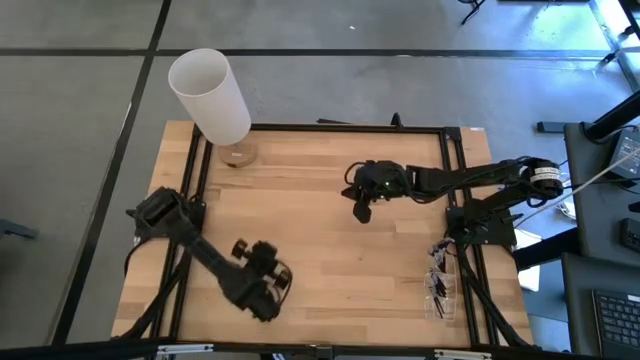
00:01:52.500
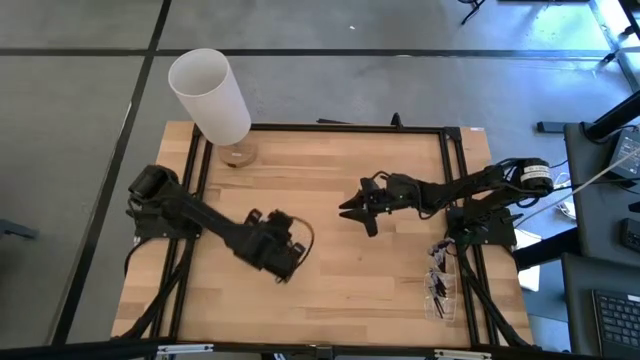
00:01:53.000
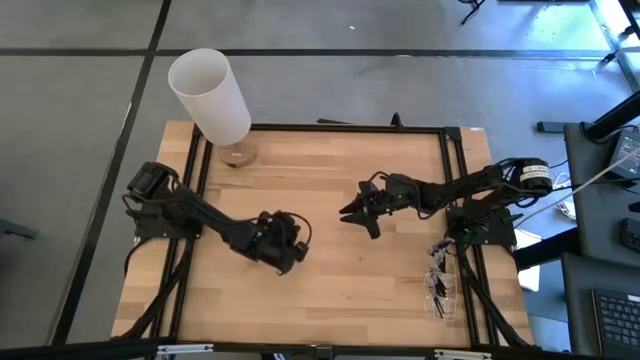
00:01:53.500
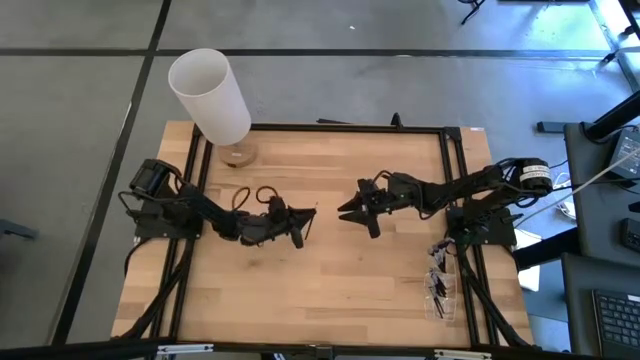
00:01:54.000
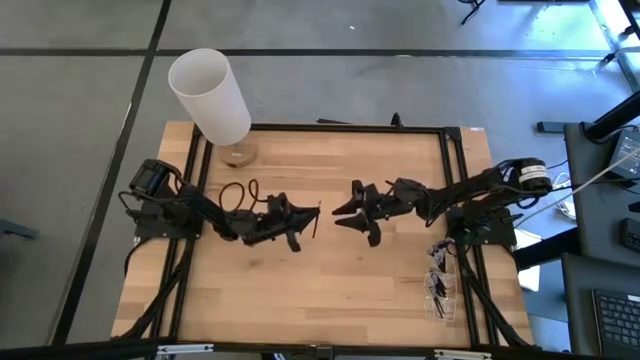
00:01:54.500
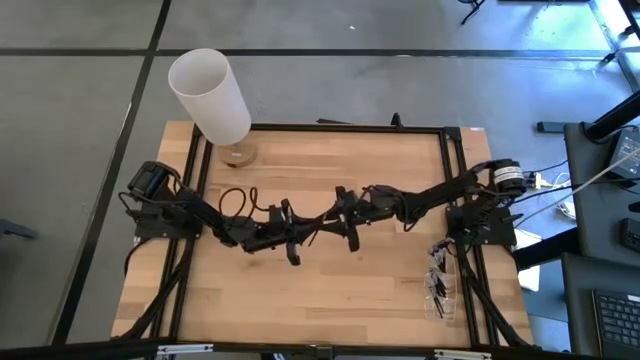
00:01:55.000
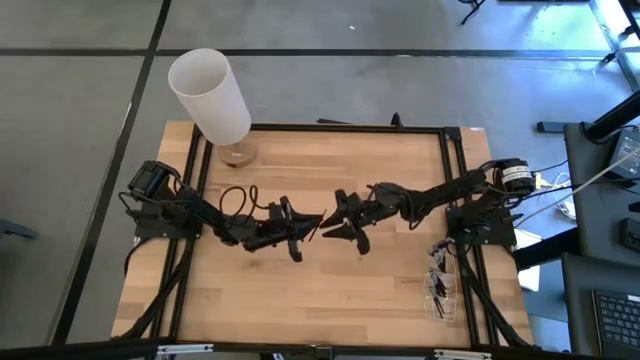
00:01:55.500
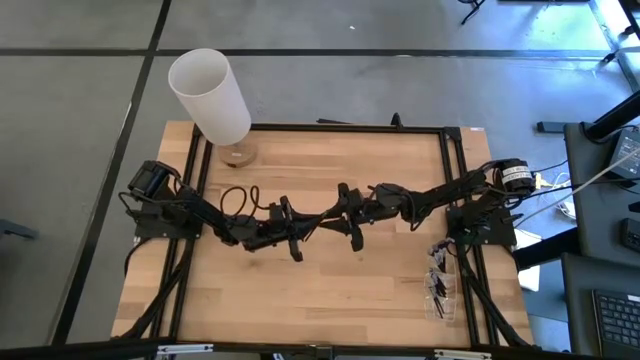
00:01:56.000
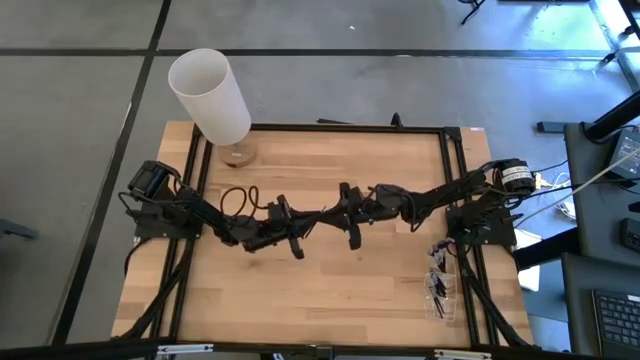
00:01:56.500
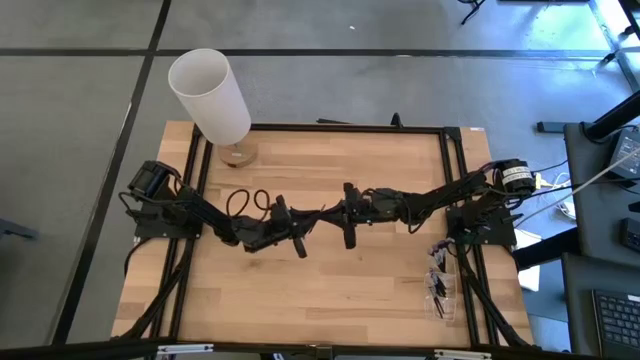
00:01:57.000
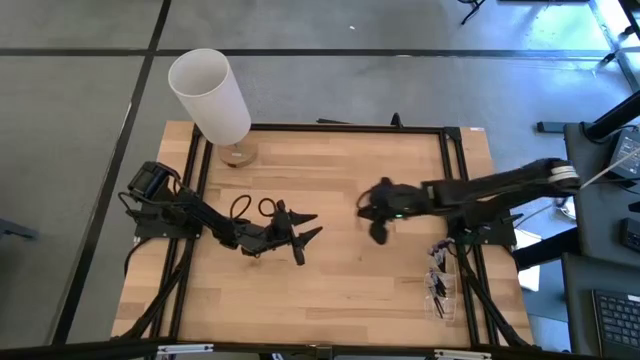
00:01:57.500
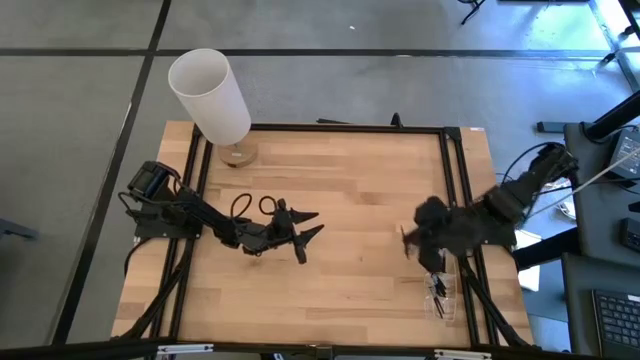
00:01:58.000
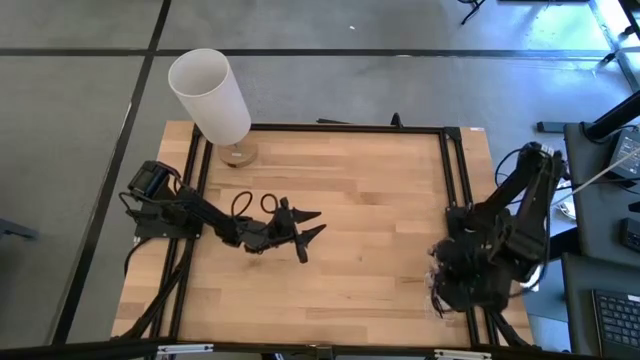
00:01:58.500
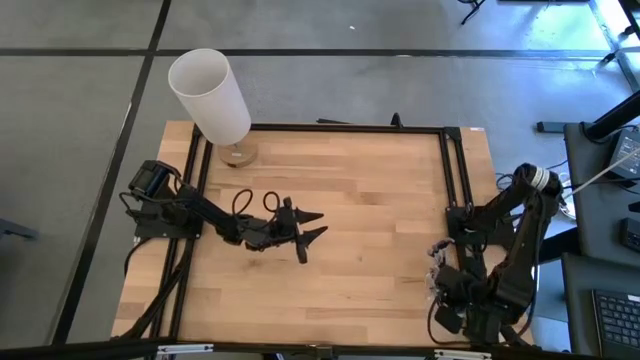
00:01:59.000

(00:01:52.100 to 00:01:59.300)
Task: Put items in baskets/containers
Put the eyeshadow brush into the transparent organizer

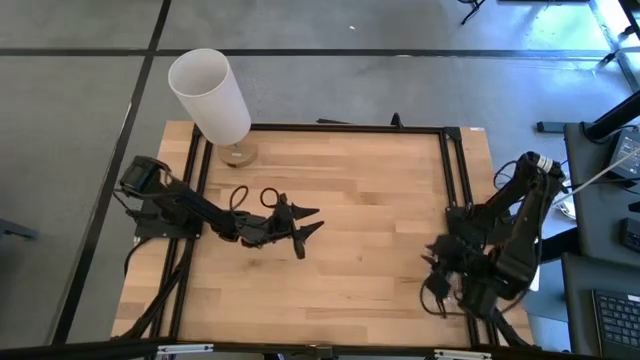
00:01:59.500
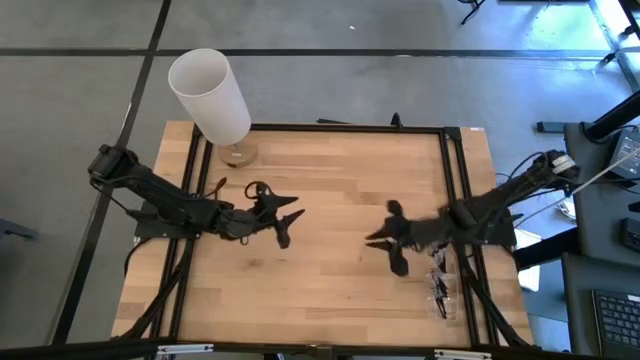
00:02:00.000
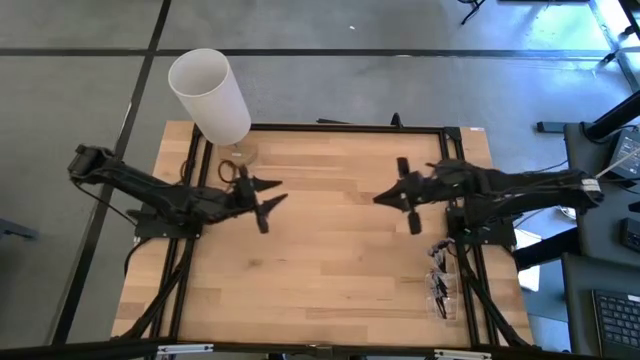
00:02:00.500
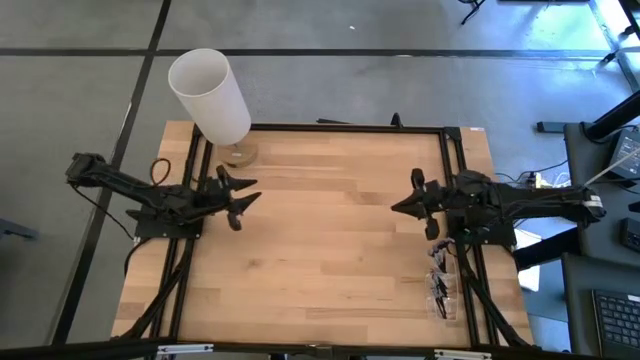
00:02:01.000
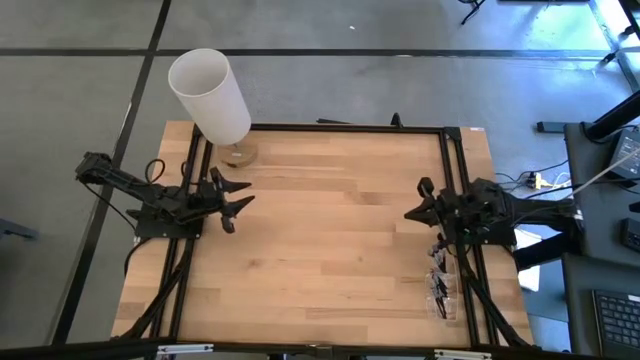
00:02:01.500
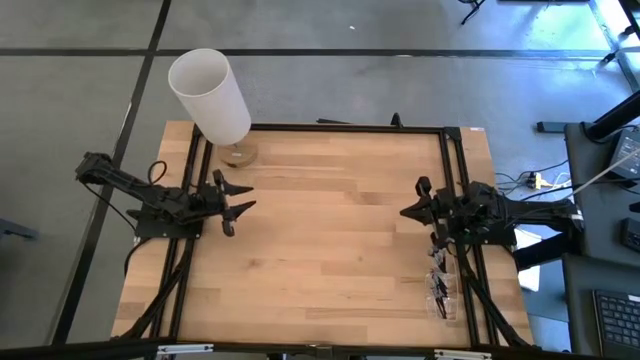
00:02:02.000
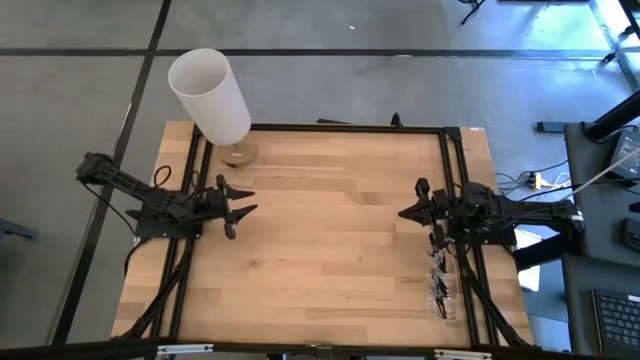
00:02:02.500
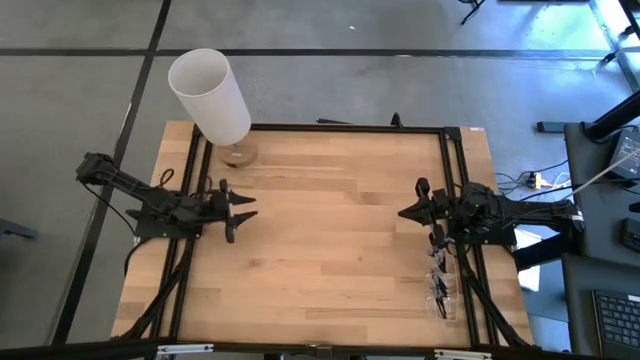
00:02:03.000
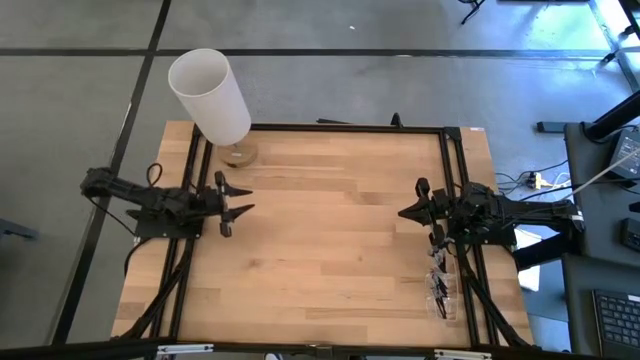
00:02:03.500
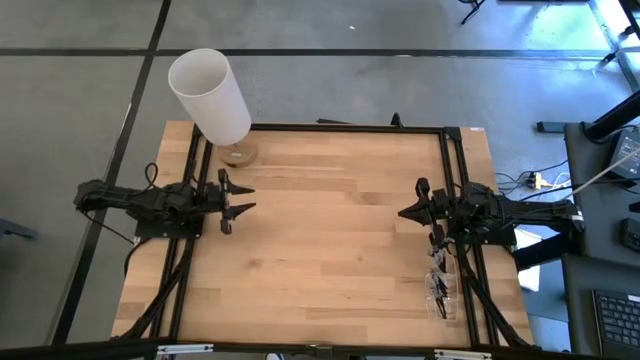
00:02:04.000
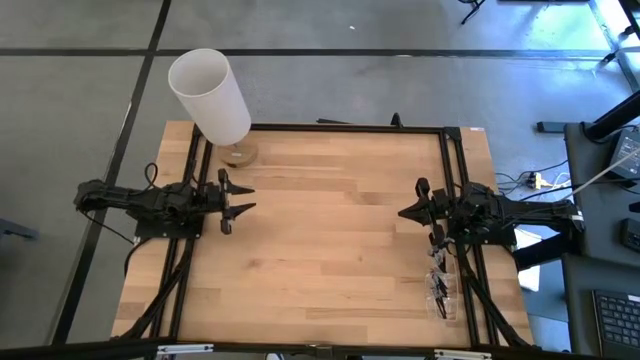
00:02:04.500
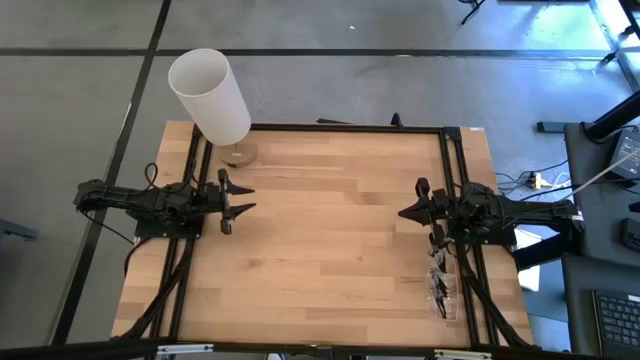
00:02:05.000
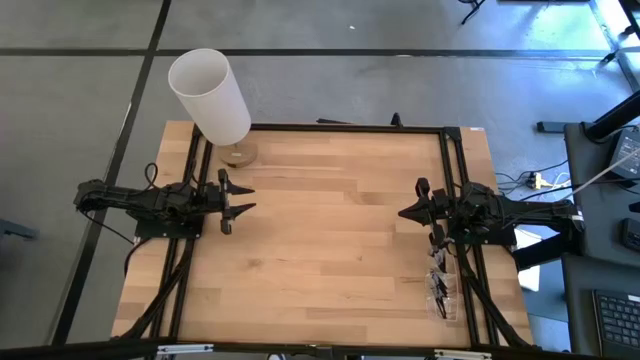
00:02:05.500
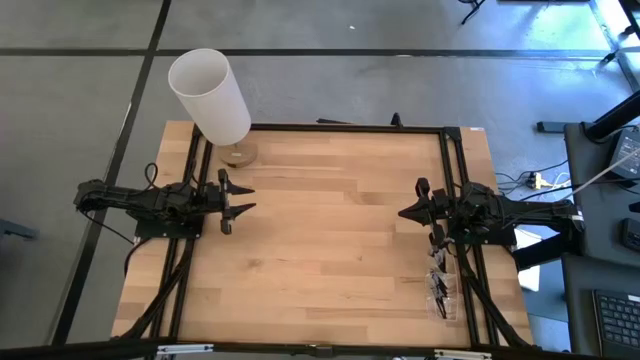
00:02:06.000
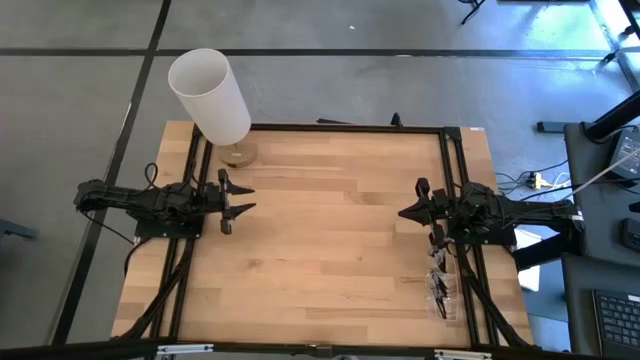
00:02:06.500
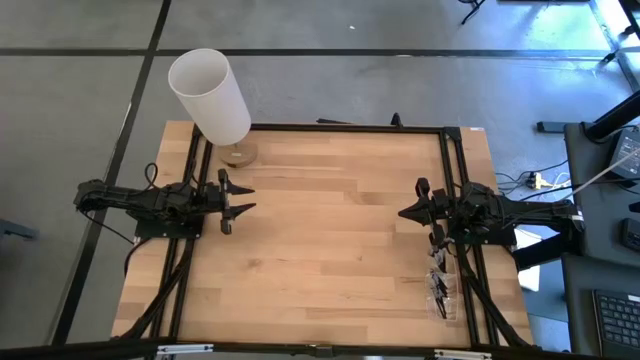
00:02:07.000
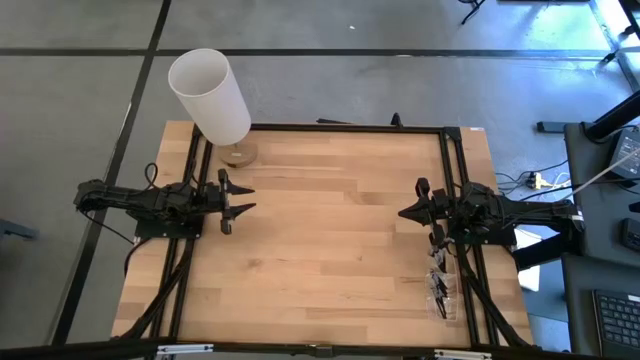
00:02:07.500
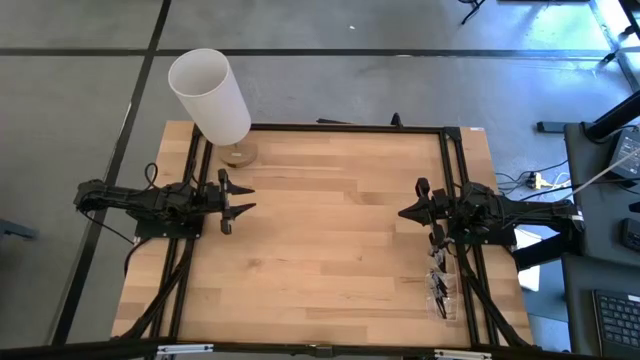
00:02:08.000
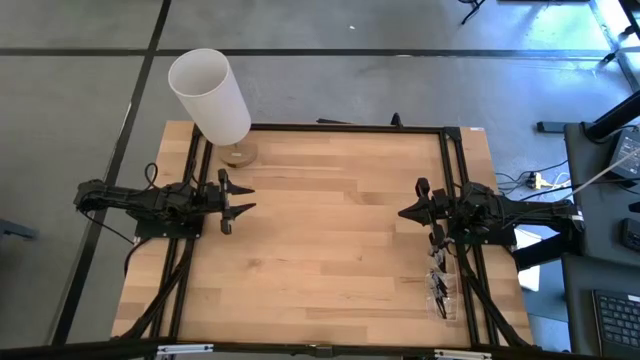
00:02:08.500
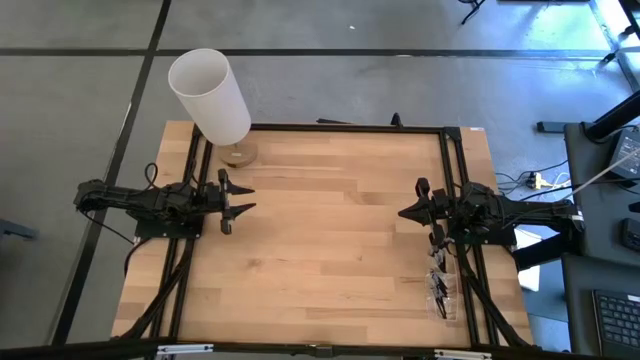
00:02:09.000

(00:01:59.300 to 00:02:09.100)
Return to Home Position

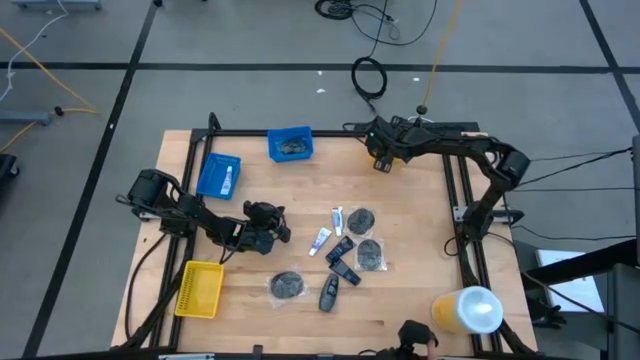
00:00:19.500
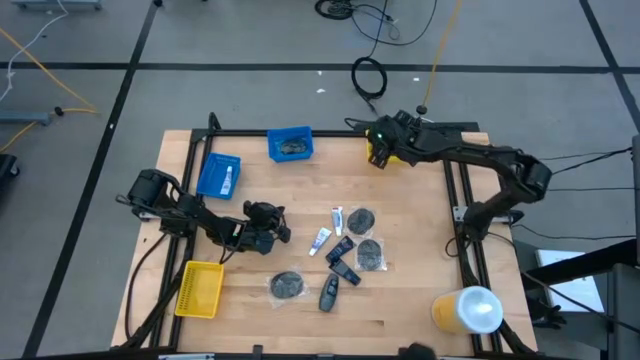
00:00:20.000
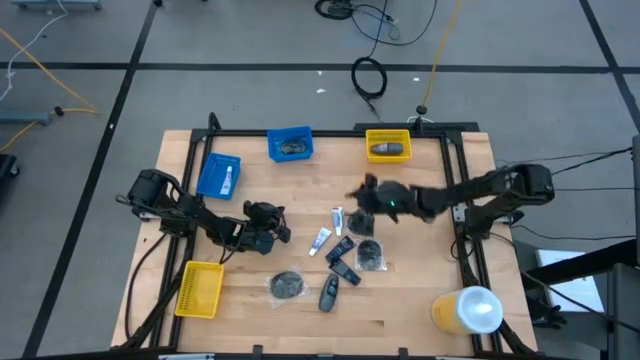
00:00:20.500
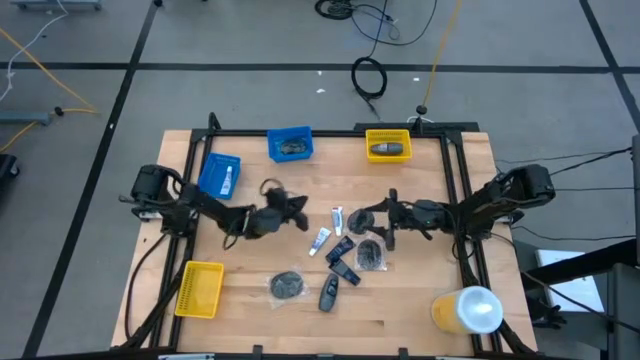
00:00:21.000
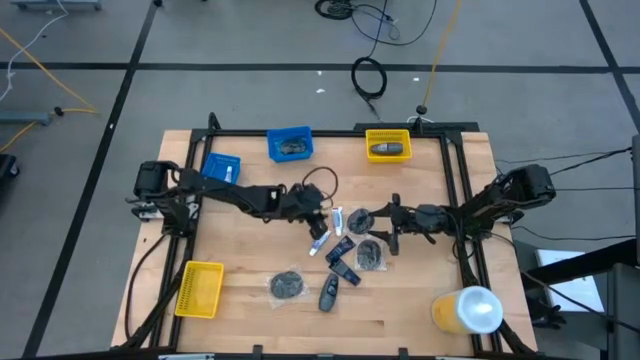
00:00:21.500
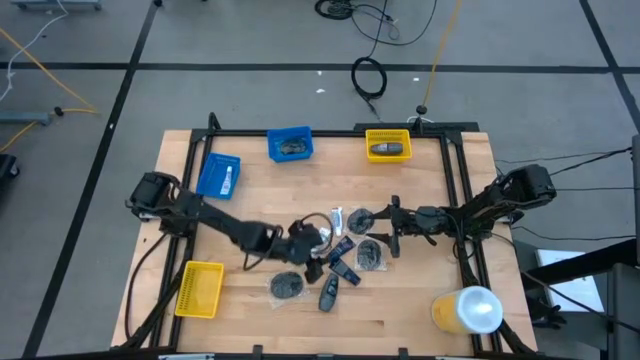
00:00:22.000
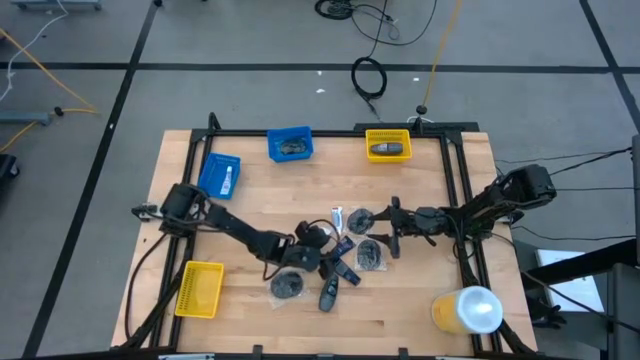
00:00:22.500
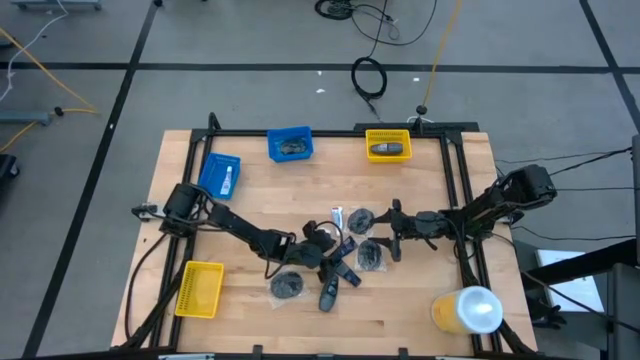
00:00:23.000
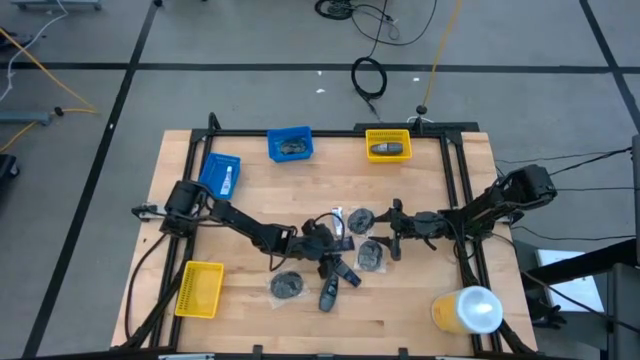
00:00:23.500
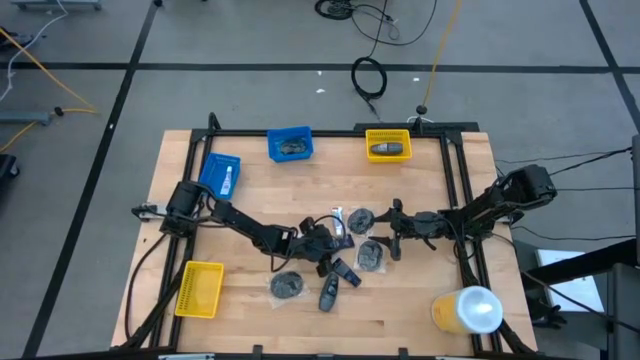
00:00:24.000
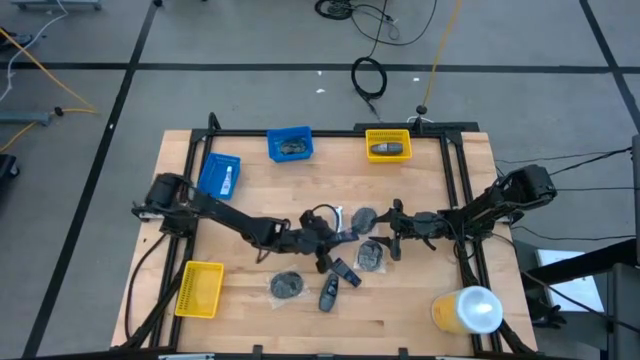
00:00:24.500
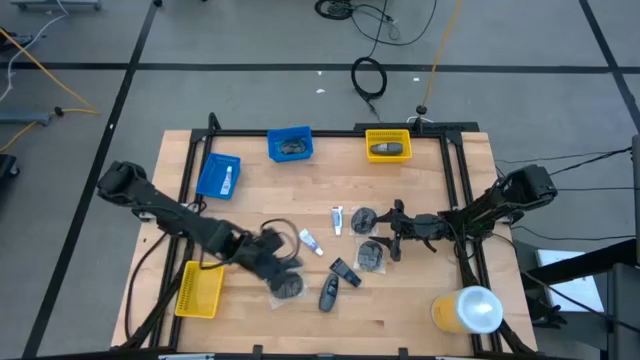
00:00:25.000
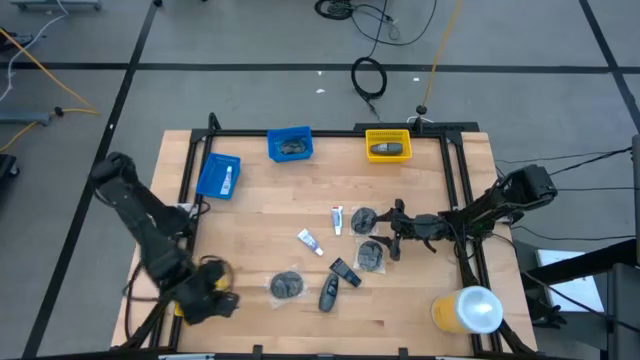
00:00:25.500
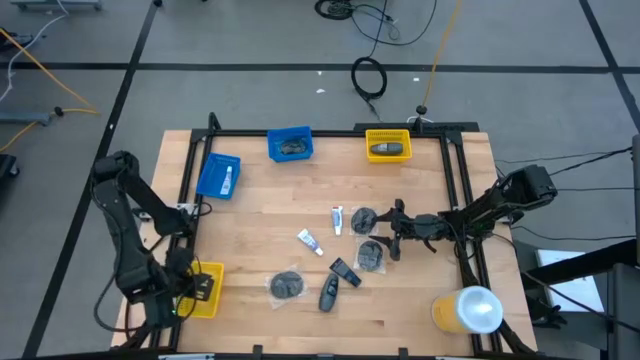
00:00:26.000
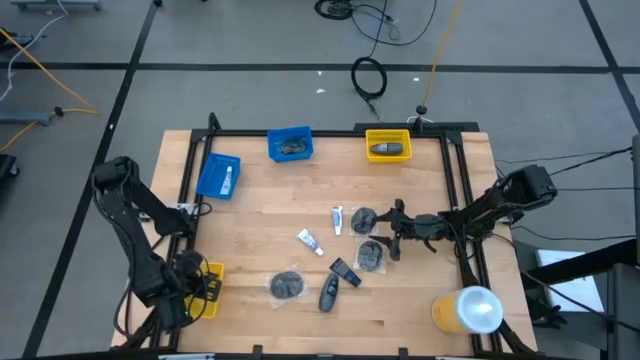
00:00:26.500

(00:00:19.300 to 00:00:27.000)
Task: Pick & Place Travel size toiletries
Put the blue shave cream into the bottom yellow bin
